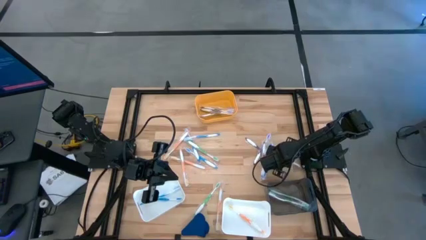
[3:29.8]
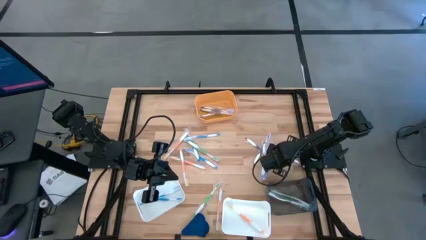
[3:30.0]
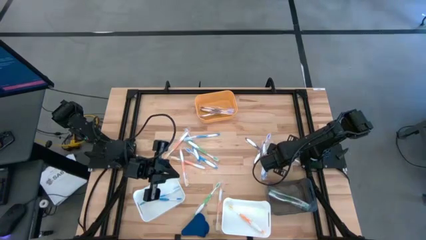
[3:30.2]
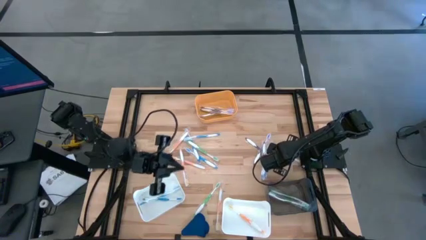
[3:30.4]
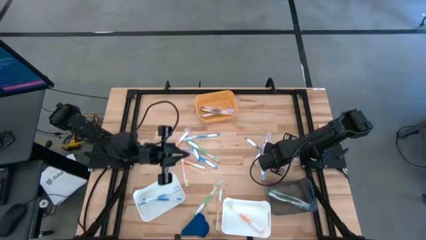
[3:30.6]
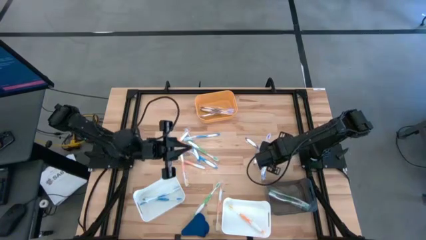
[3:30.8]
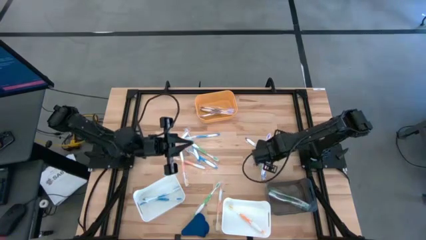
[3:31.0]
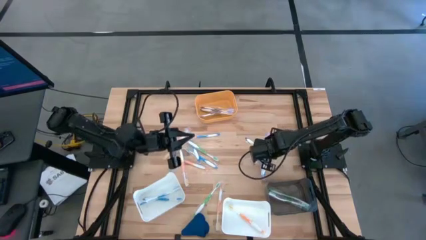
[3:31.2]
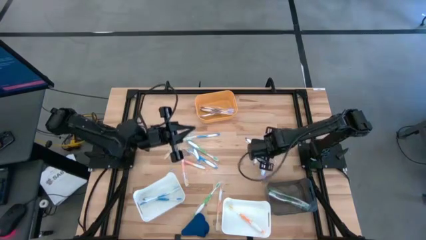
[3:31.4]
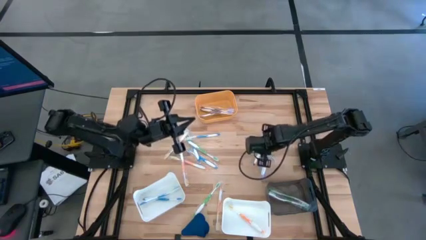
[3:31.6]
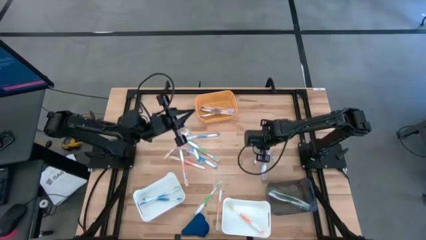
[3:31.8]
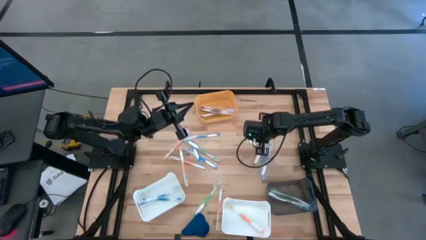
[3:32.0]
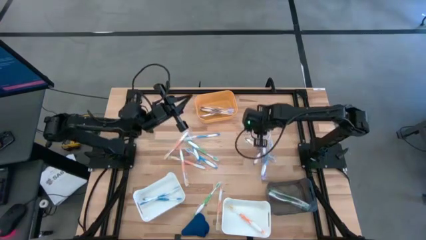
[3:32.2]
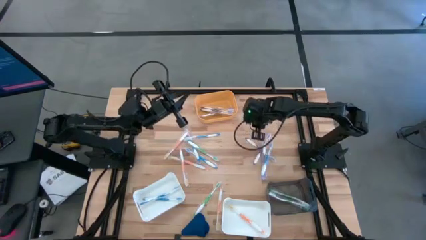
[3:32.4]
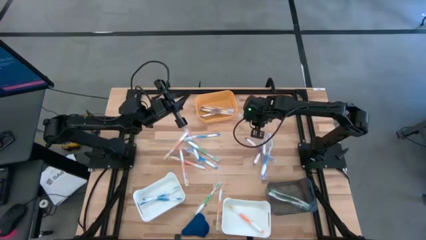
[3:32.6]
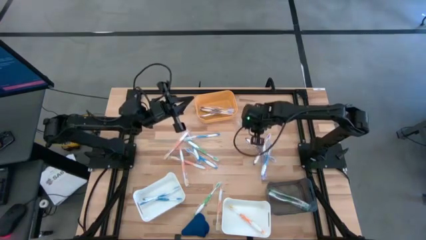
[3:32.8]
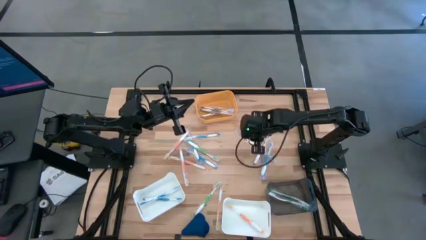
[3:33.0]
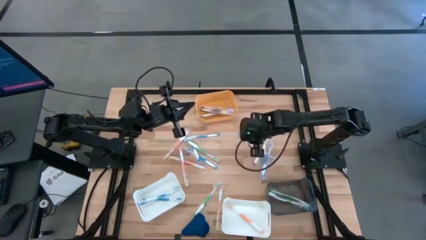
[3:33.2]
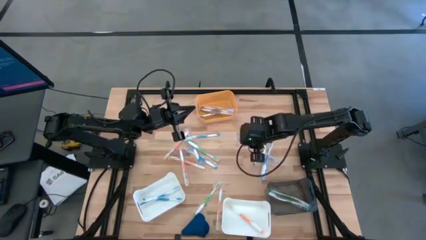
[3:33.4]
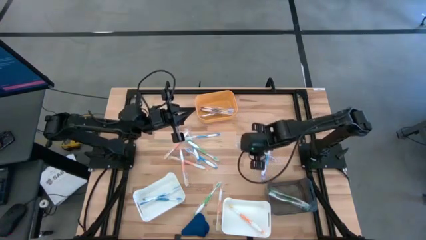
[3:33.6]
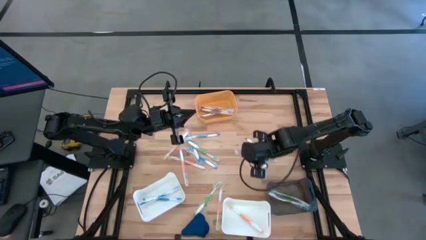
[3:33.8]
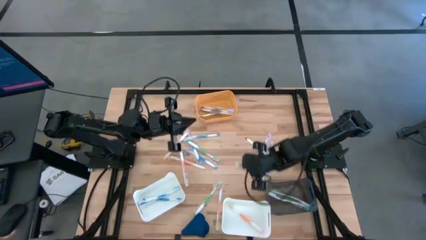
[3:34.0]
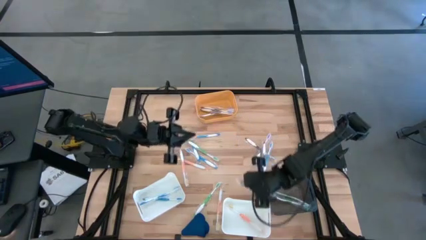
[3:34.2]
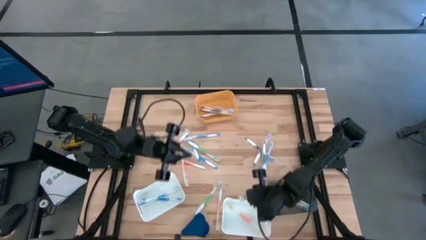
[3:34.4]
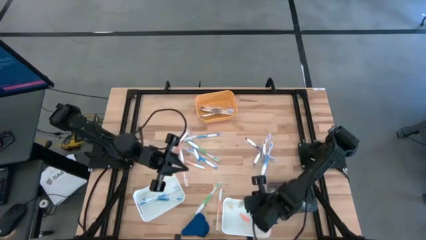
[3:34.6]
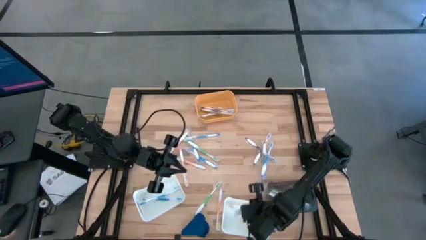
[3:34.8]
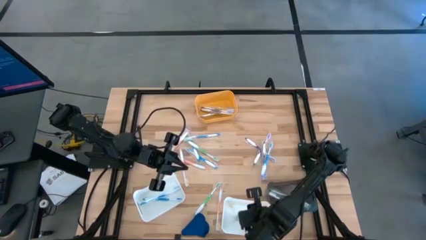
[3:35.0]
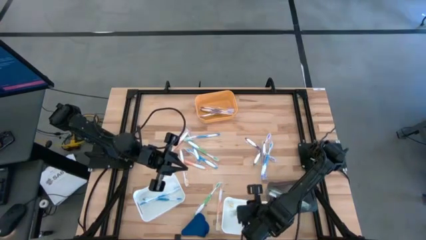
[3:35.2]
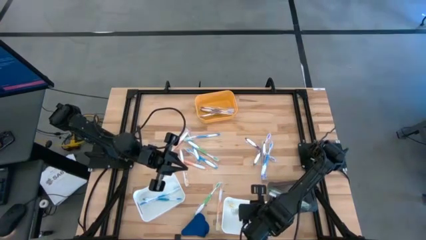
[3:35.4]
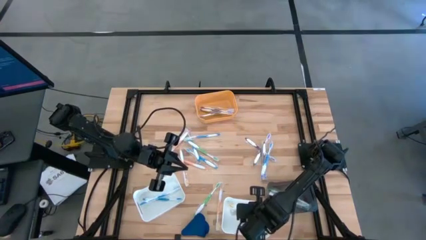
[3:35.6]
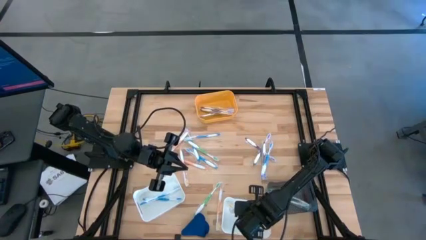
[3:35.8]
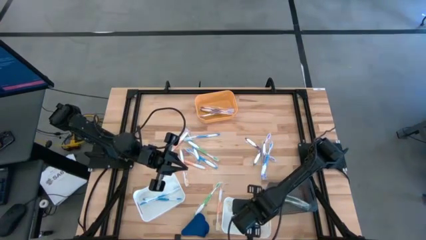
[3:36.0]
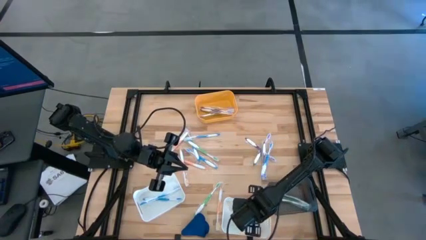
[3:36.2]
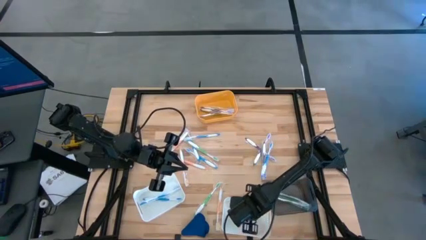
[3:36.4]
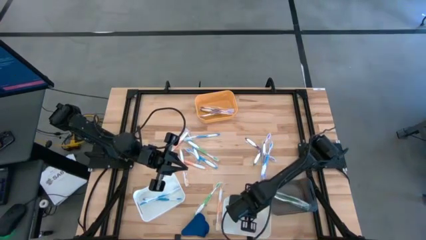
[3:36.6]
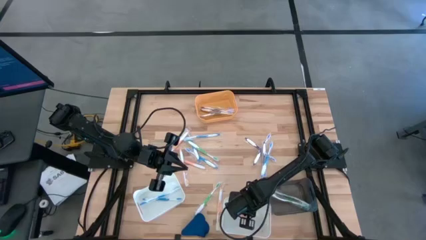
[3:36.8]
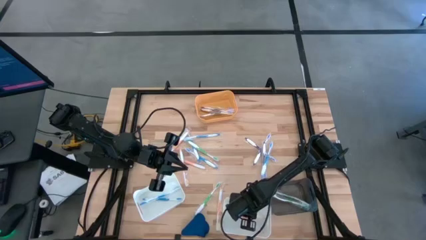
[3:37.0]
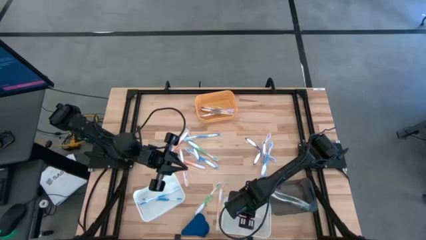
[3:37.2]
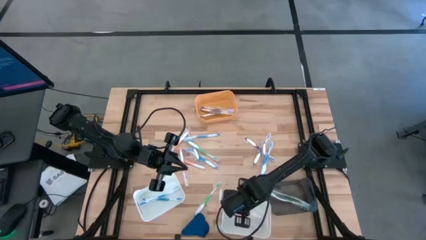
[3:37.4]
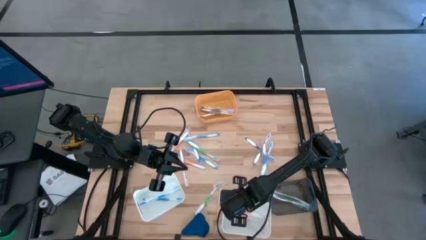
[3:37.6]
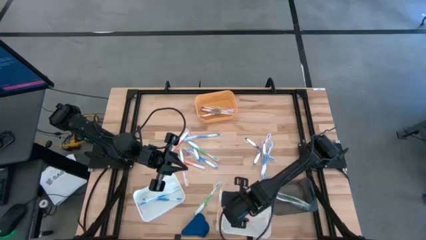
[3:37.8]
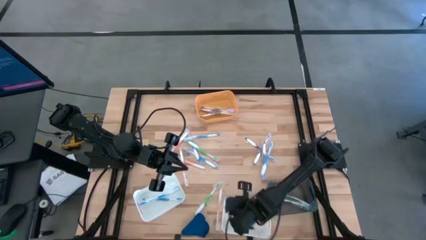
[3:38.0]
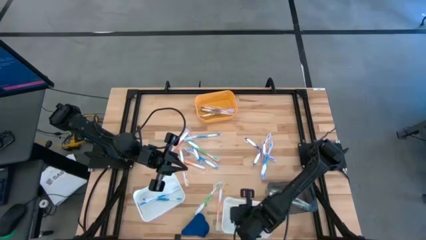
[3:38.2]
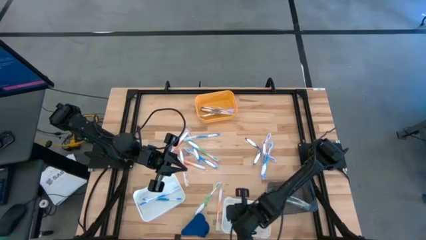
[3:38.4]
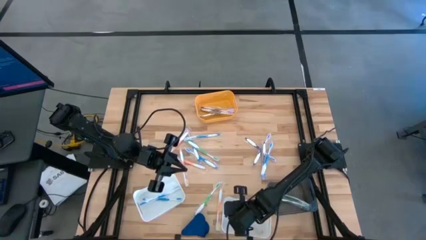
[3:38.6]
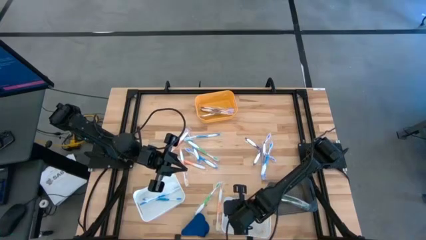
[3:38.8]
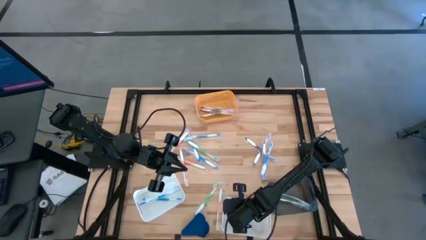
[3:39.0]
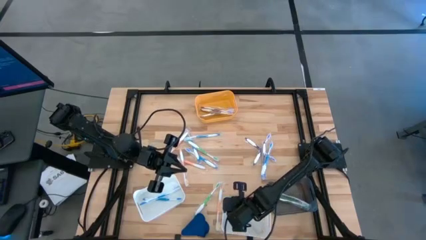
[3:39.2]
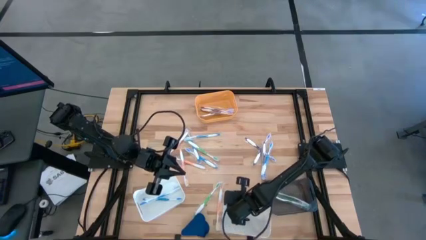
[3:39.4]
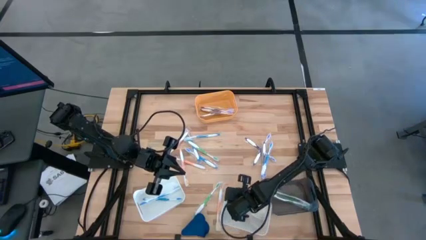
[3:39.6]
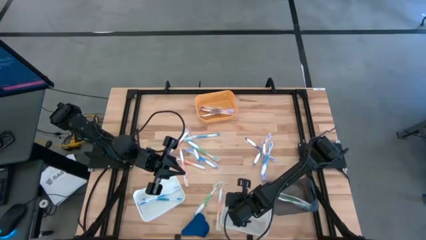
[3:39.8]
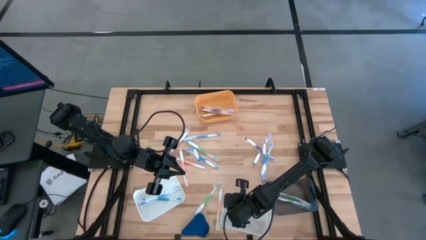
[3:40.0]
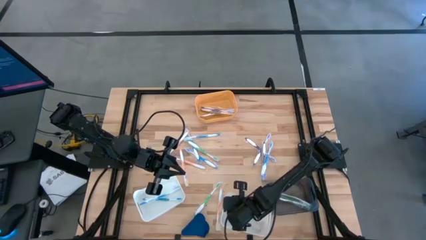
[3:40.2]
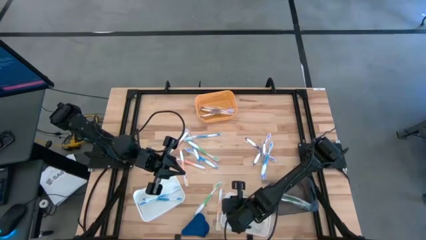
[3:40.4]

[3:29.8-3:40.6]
Task: Pick & Place Toothbrushes
Put the orange toothbrush into the right white bin

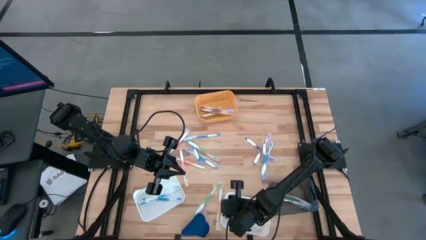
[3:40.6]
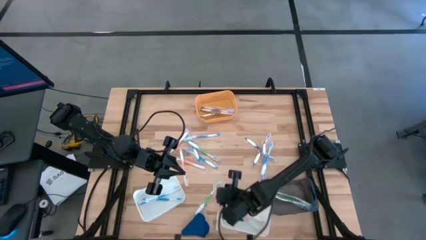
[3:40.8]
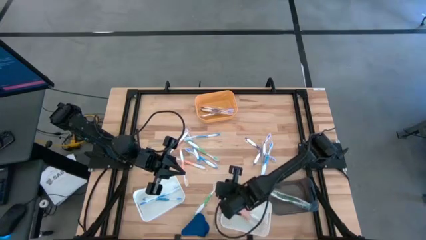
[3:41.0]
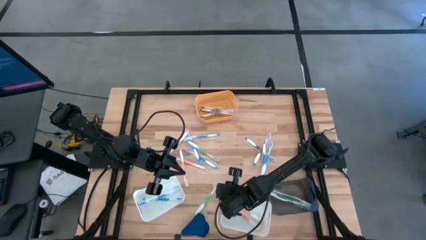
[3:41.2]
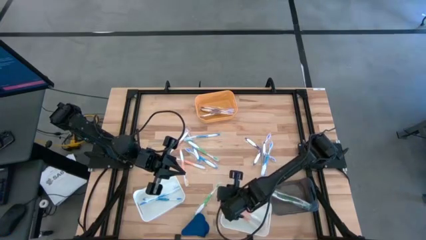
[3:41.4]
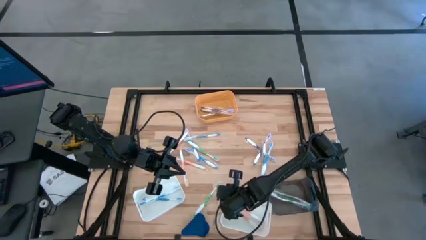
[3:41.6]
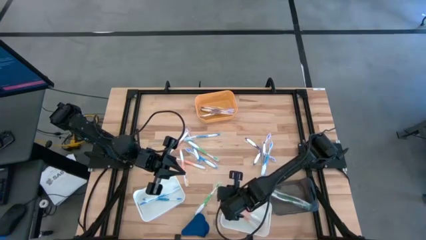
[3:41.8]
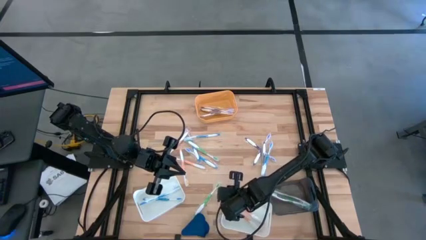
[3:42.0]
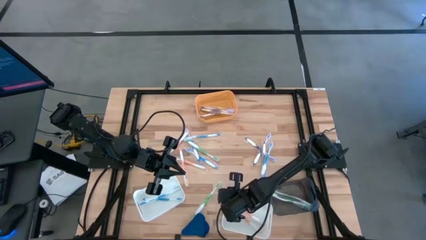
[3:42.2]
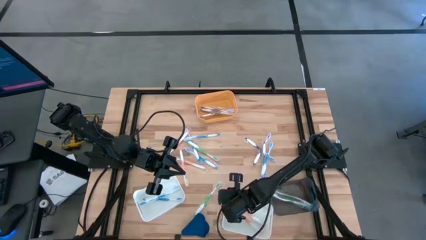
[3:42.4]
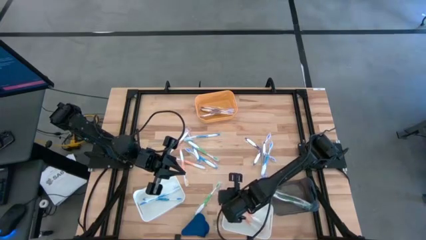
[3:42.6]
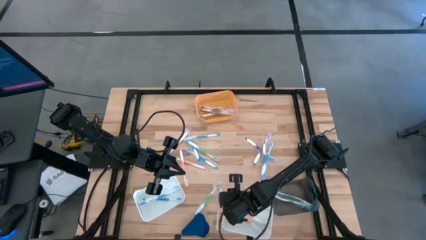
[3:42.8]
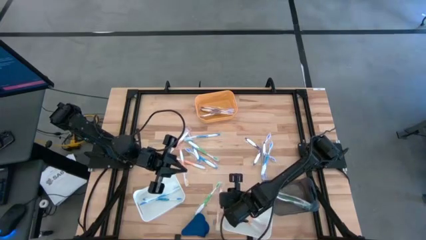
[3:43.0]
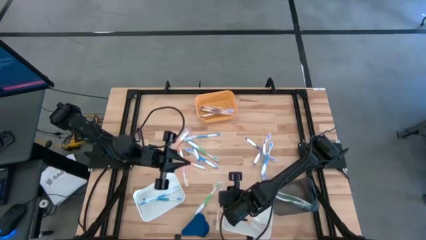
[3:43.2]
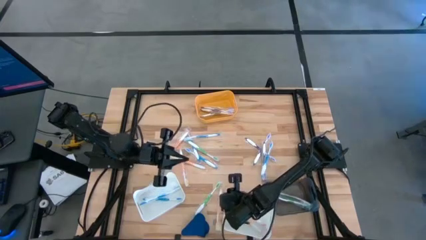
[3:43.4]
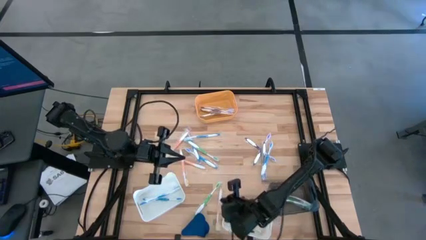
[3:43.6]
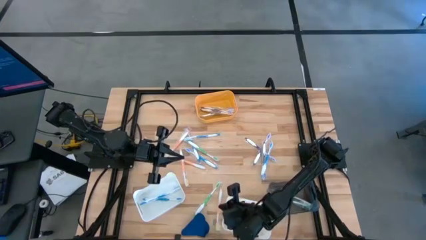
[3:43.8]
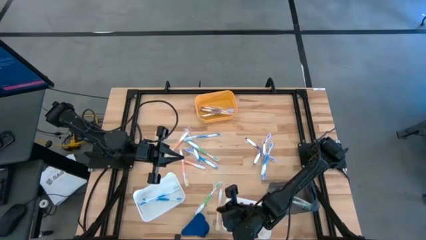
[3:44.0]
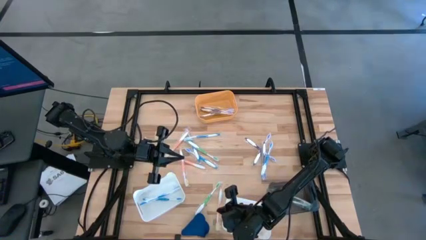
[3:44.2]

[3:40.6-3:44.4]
Adjust the right white bin

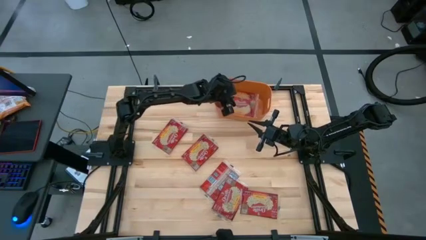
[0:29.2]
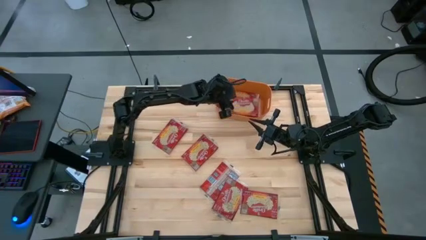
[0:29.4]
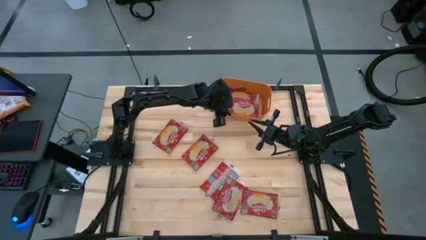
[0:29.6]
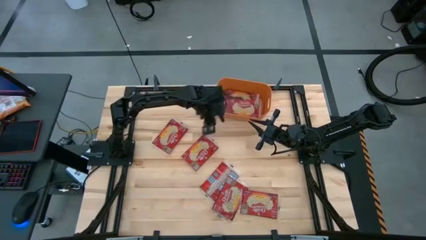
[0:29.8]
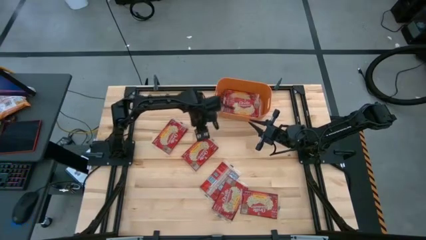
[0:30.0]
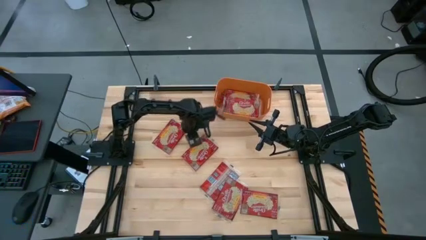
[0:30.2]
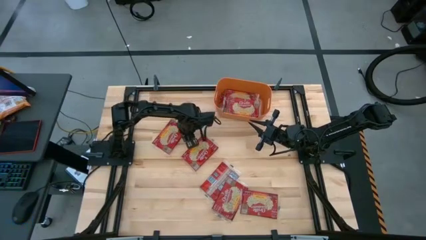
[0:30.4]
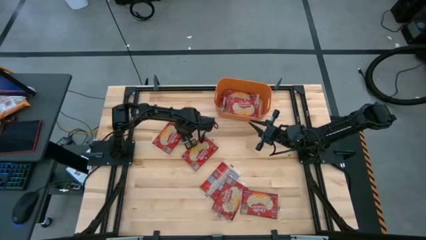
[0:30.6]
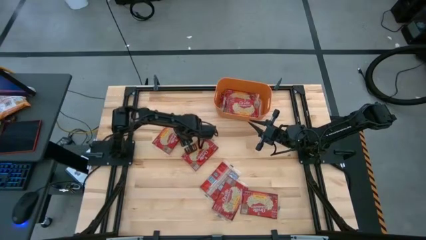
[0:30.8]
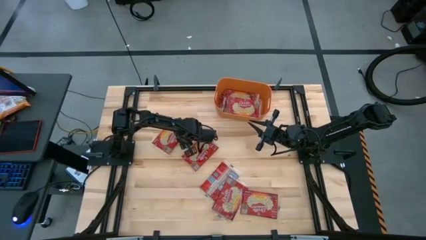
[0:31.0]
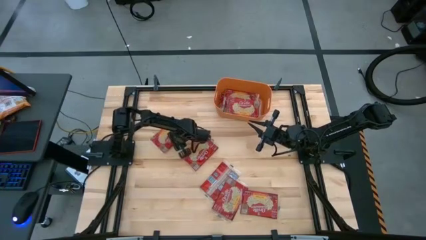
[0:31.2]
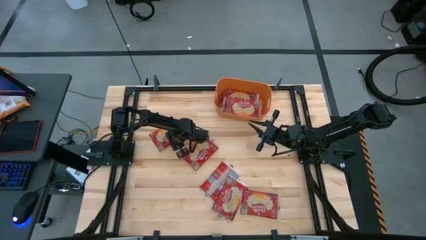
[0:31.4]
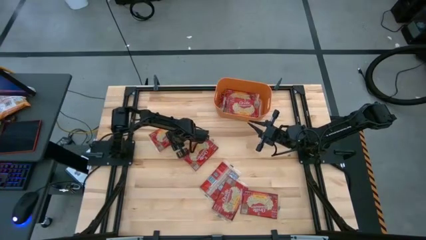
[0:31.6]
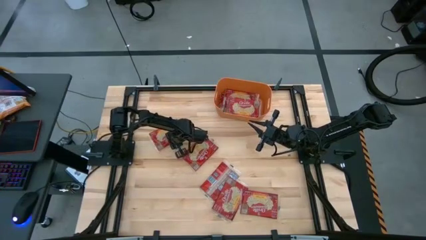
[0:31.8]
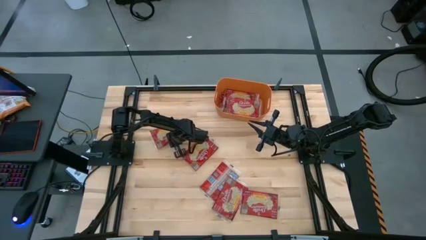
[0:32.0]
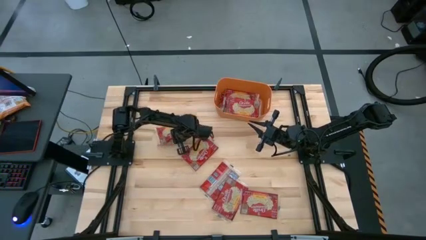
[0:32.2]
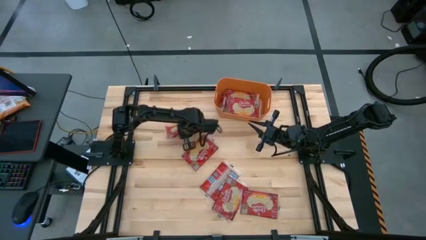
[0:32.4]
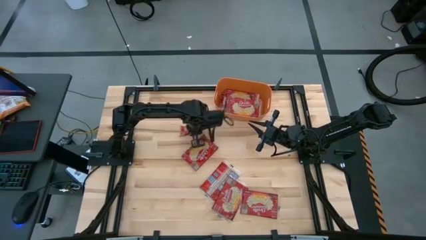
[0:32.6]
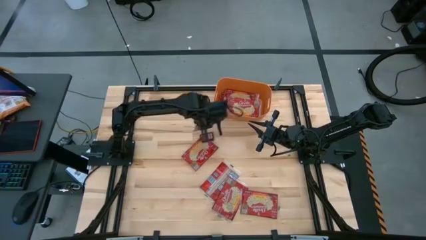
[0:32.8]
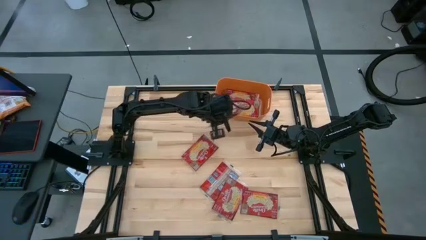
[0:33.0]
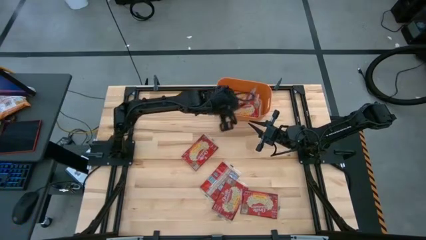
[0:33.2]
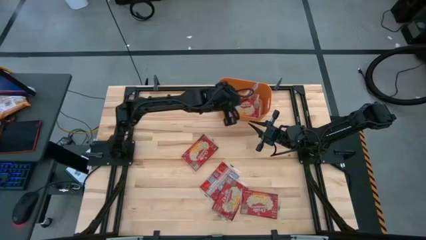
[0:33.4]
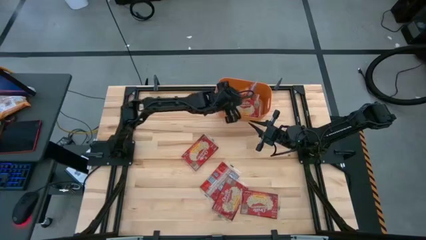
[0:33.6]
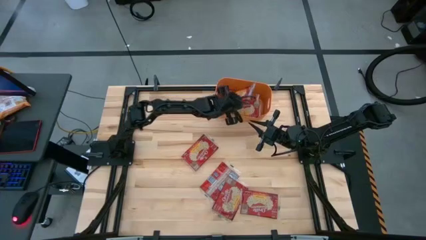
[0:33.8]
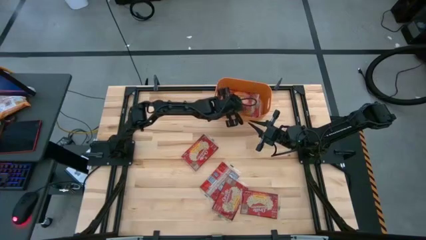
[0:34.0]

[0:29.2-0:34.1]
Task: Sort popcorn bags into baskets
Put the popcorn bag into the bin
